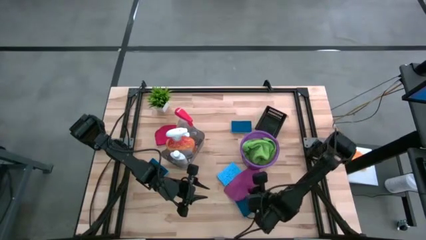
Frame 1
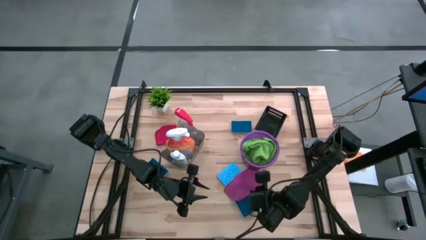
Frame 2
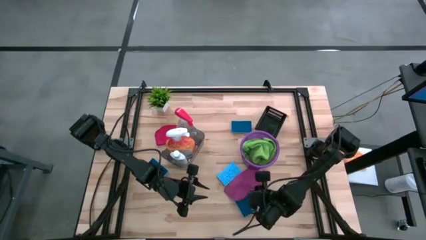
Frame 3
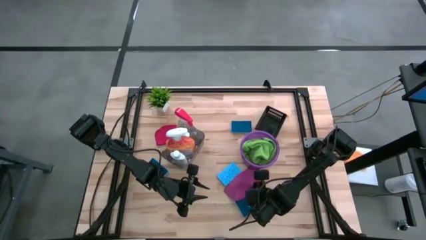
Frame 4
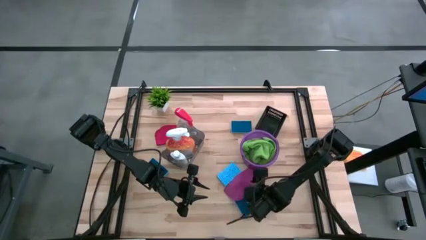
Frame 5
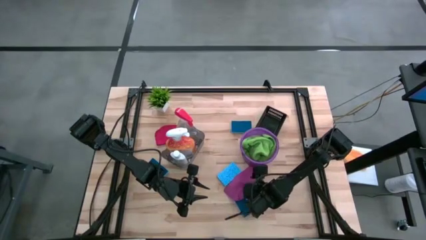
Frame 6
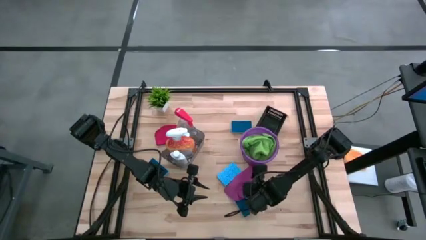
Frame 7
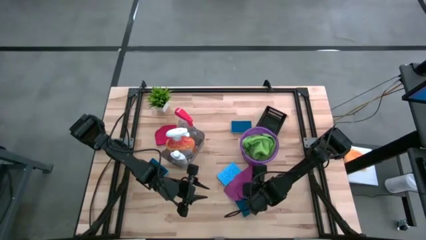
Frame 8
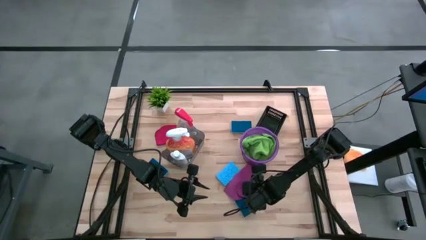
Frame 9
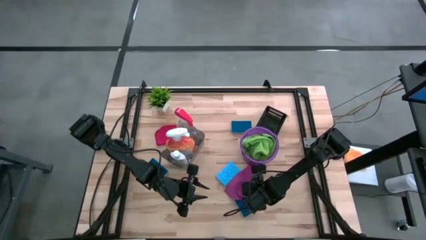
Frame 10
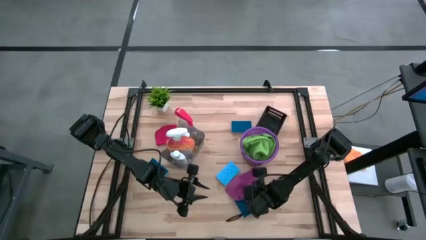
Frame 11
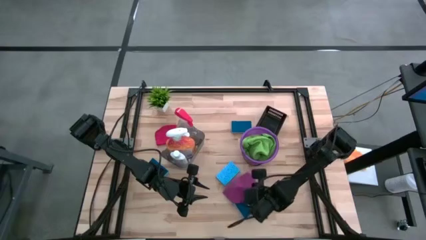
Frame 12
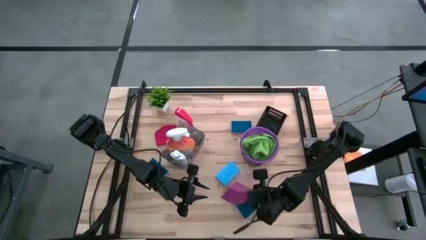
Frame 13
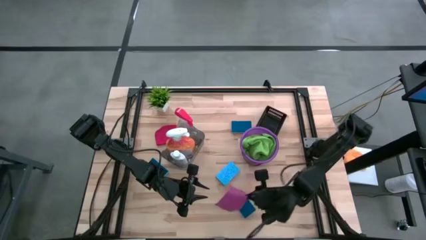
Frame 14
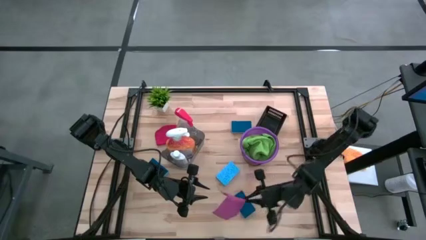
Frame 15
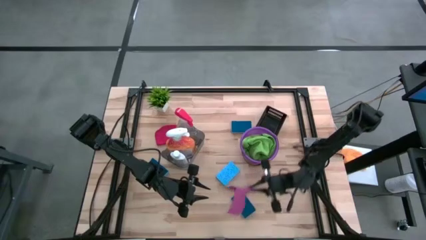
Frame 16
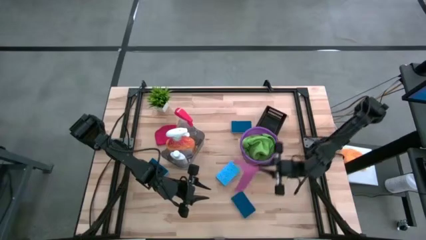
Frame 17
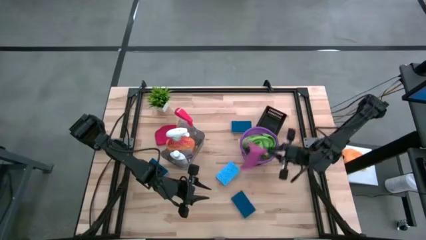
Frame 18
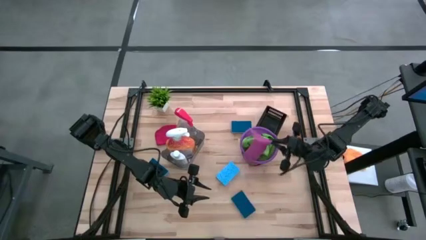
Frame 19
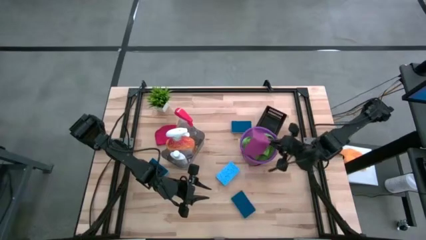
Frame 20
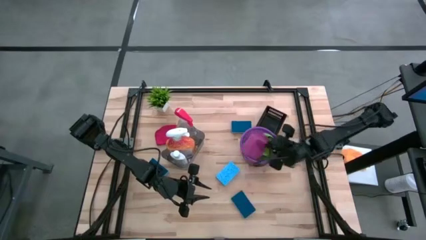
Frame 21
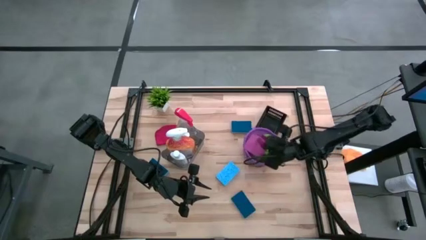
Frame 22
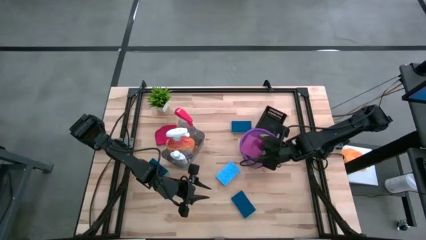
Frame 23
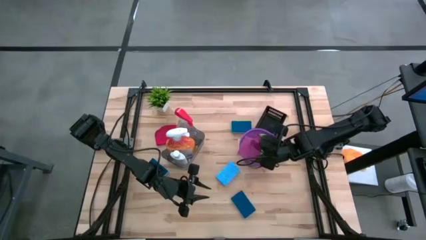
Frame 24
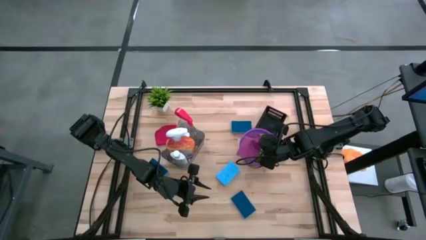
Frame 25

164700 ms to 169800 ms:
Task: Pick & Place Kitchen Items
Put the pink microfiber cloth into the purple bucket

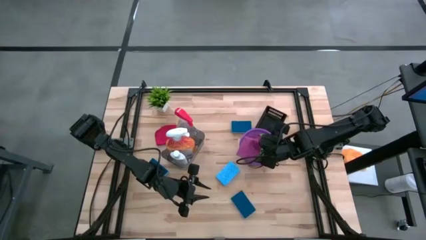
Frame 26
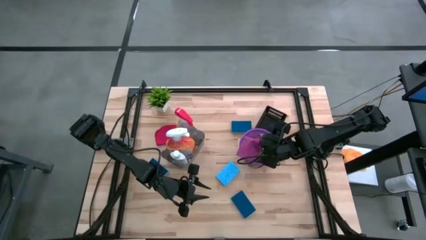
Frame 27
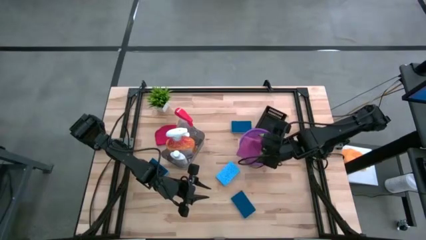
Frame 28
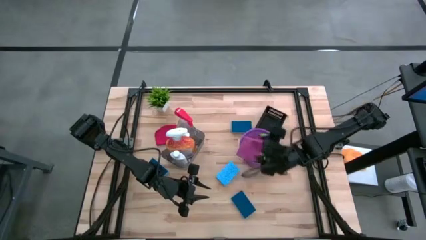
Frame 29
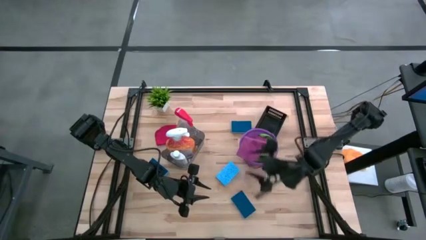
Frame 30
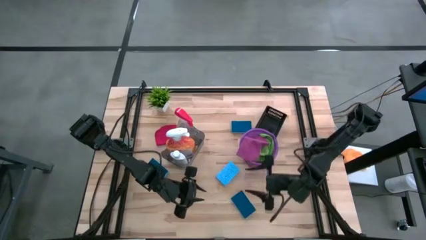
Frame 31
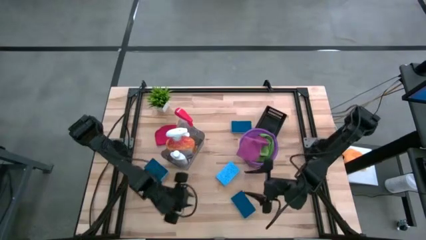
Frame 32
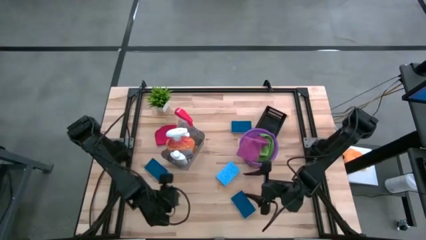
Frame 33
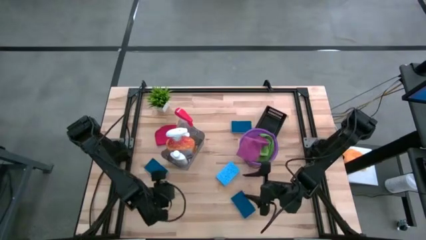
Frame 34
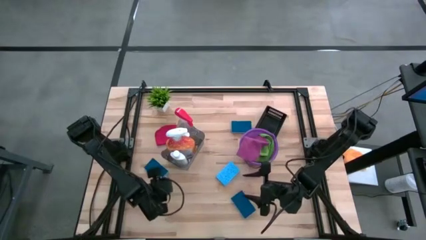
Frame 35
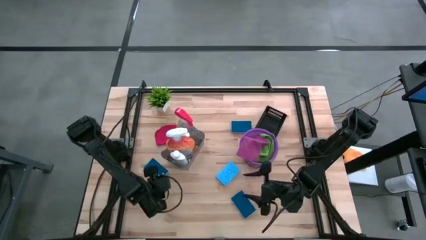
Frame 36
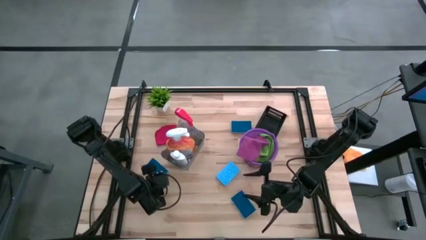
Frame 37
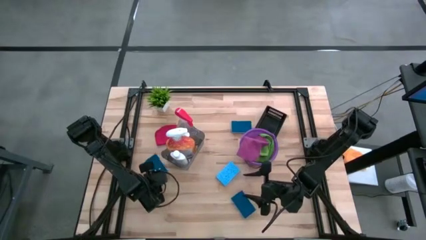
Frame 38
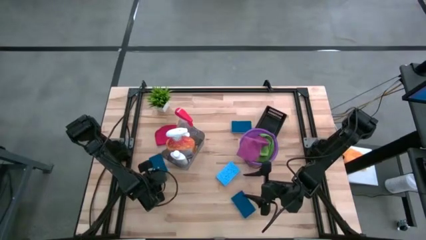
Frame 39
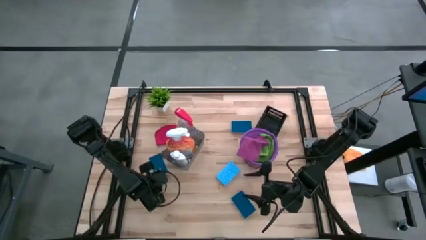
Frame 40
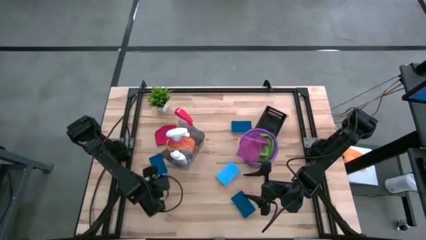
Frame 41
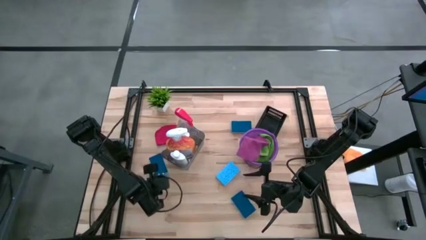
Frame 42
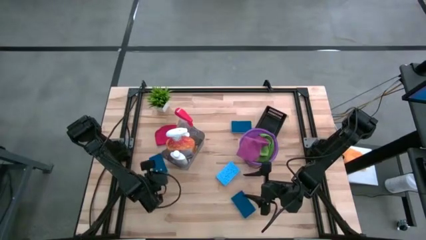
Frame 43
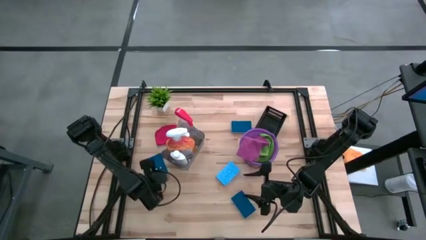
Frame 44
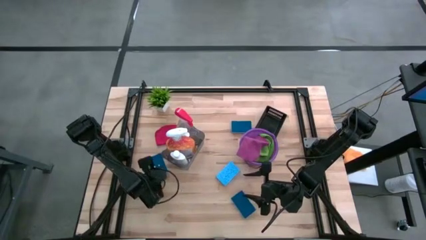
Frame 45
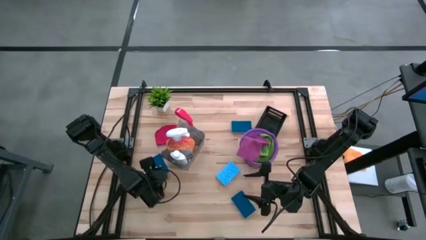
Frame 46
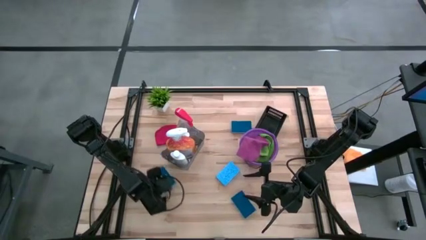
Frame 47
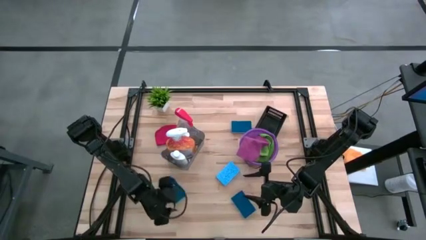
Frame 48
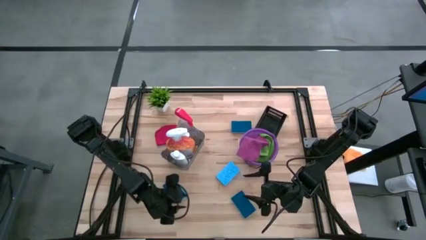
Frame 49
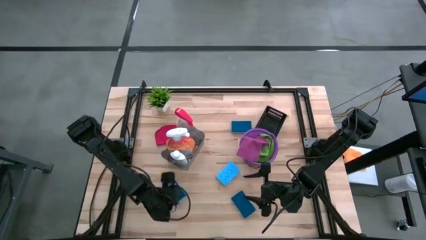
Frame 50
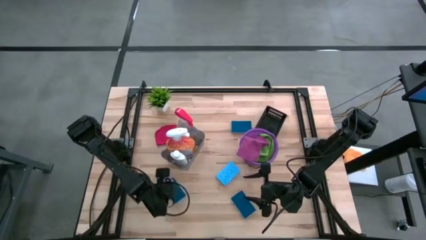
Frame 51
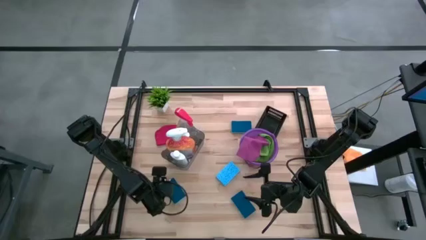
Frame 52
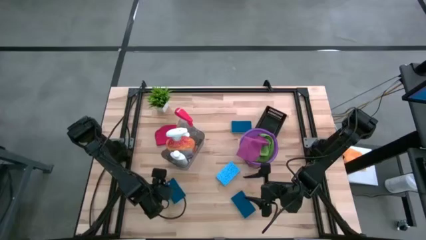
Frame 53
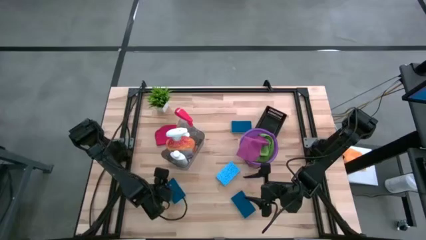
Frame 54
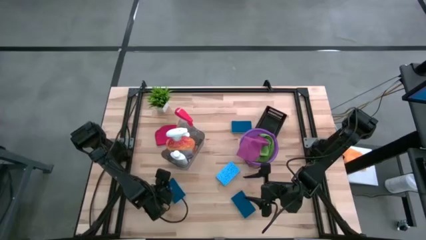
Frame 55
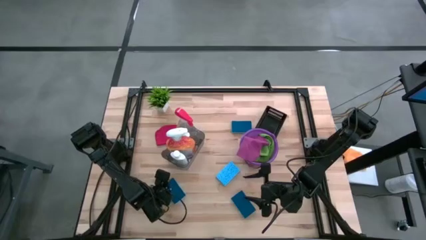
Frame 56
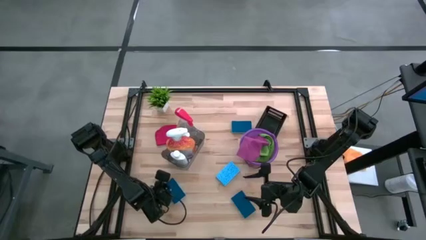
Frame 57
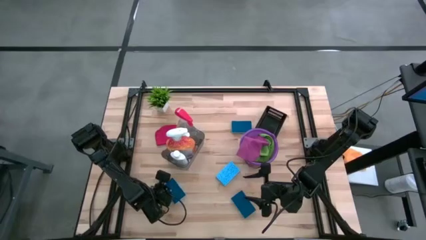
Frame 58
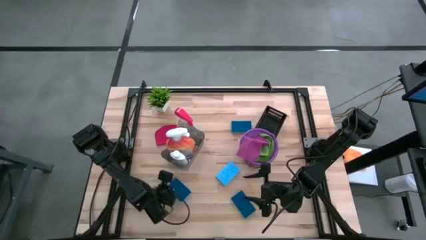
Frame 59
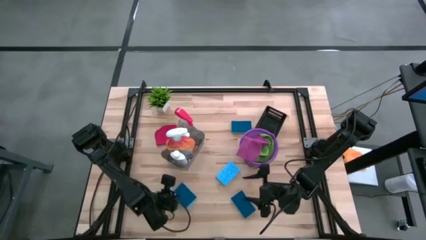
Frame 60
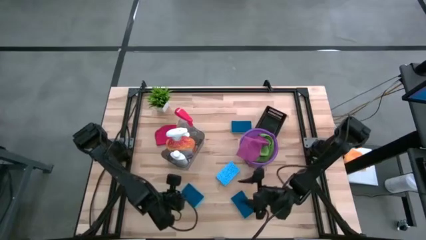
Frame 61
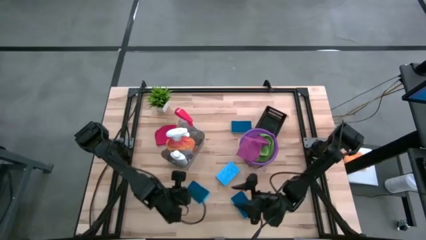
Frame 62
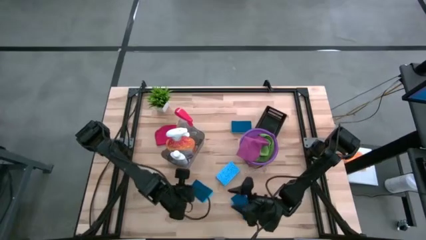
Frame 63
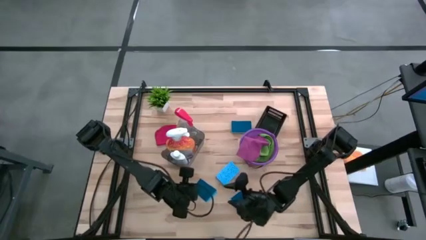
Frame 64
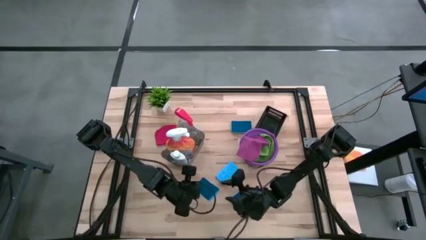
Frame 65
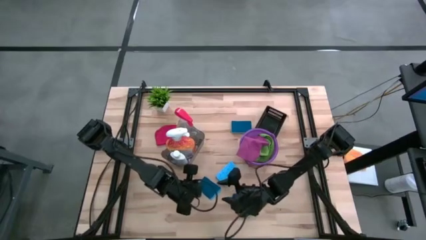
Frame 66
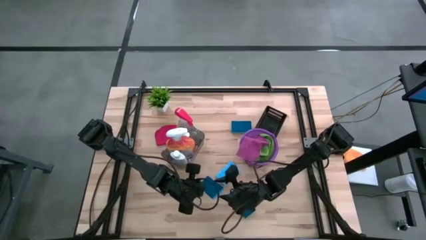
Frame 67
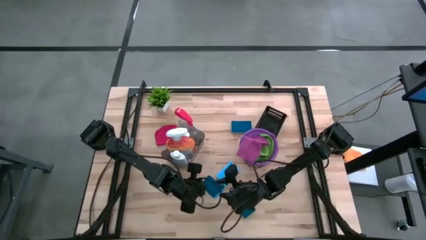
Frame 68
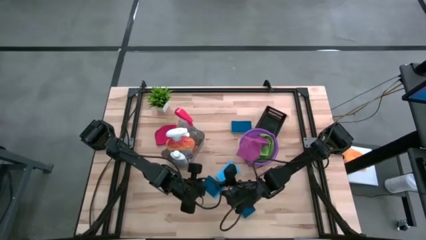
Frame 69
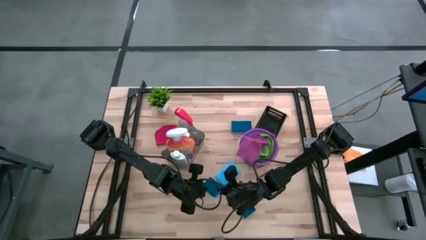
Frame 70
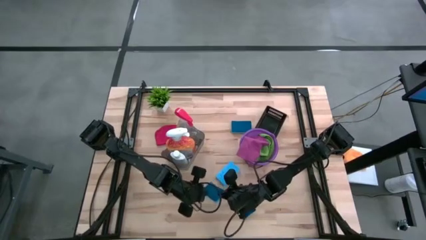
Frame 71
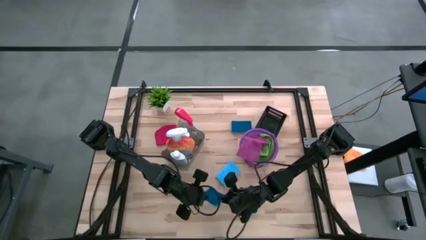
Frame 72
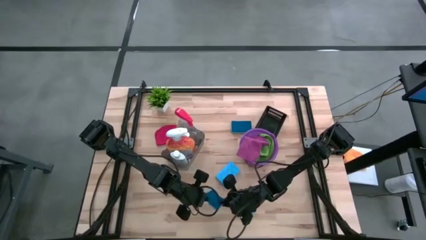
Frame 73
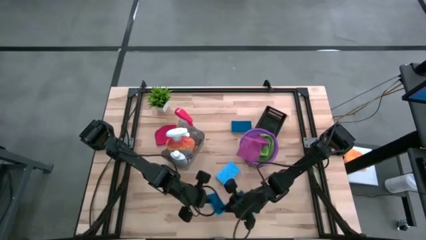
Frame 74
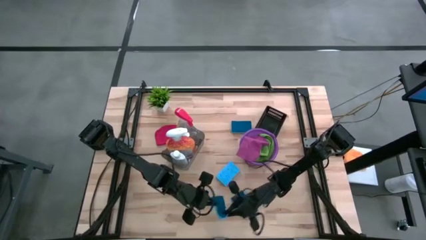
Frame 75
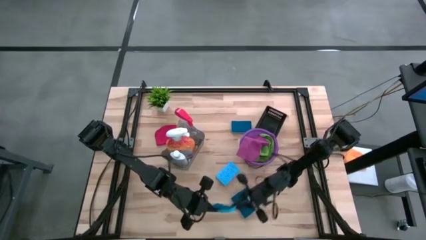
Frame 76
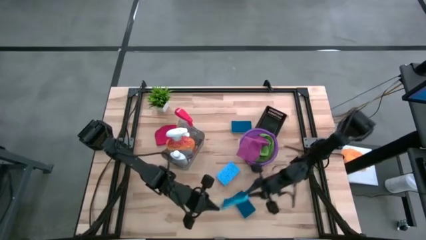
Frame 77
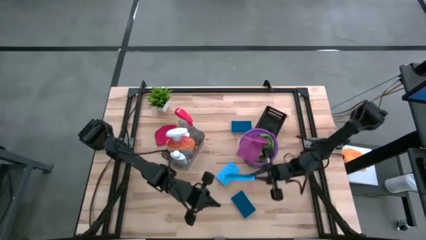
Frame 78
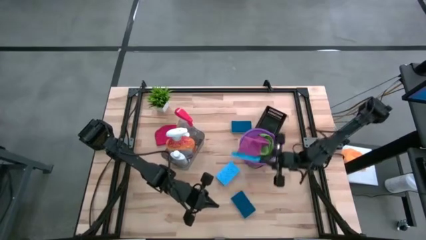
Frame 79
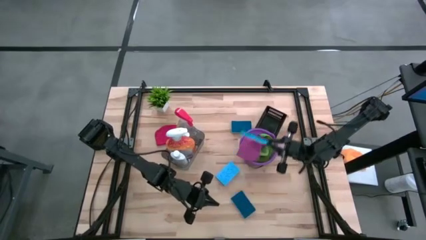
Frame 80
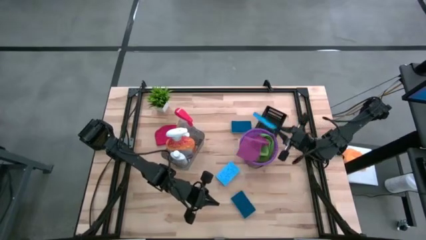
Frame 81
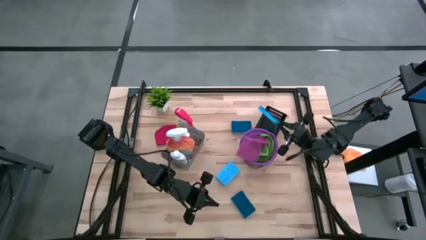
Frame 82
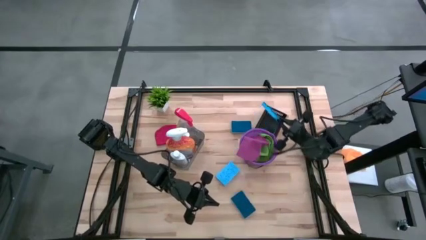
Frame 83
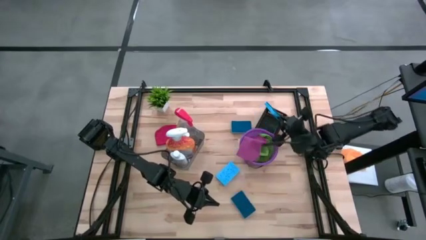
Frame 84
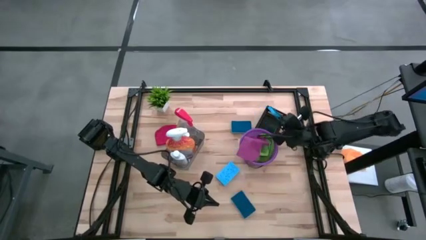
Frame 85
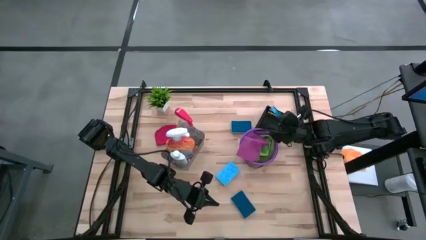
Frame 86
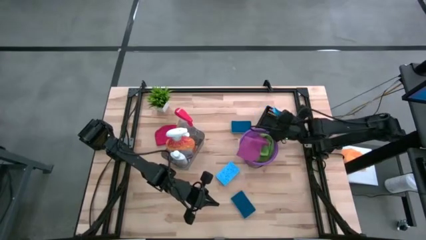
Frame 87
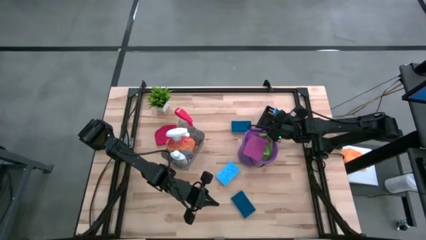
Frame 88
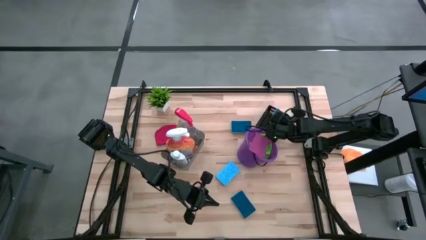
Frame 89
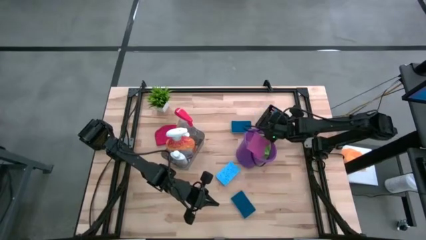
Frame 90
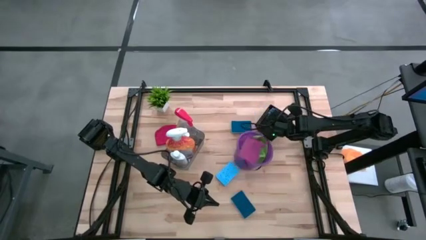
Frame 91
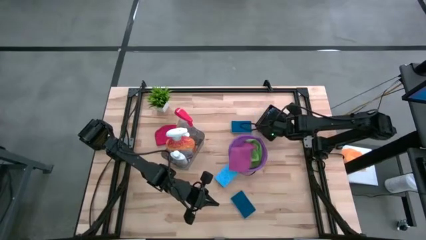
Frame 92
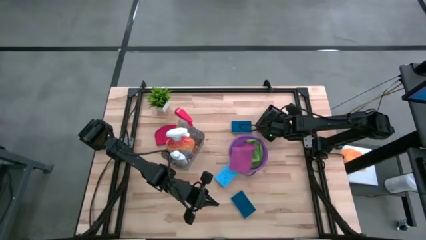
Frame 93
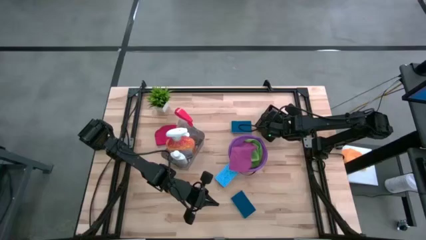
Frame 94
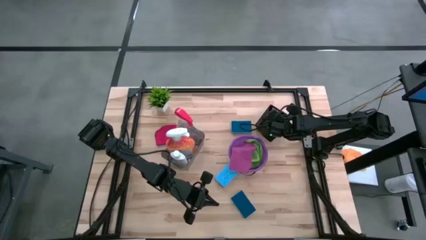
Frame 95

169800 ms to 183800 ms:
Put the blue sponge wipe into the black bin
